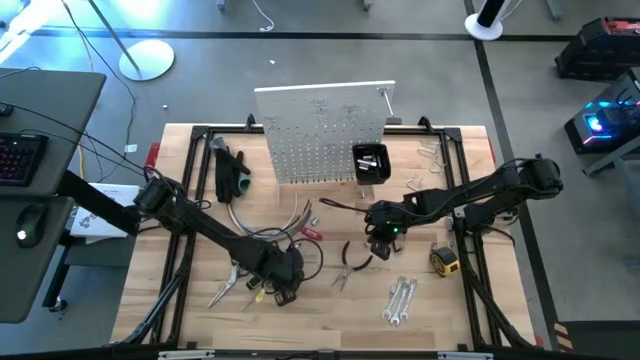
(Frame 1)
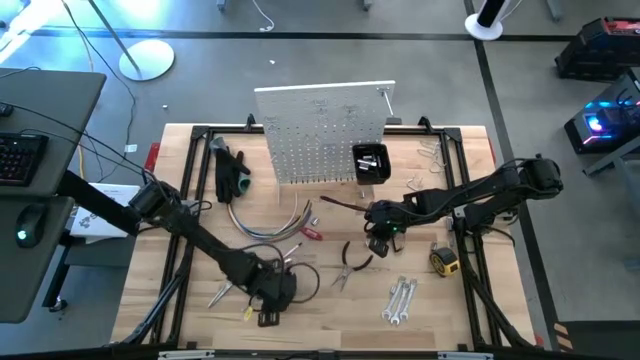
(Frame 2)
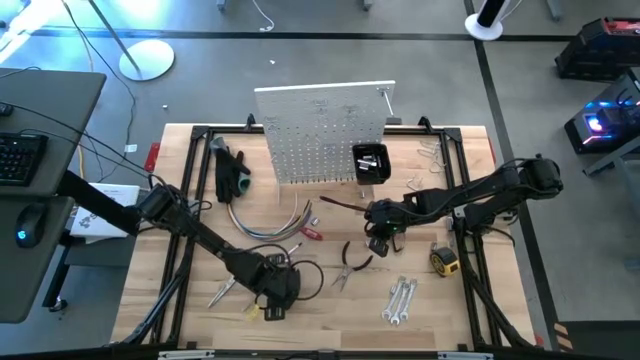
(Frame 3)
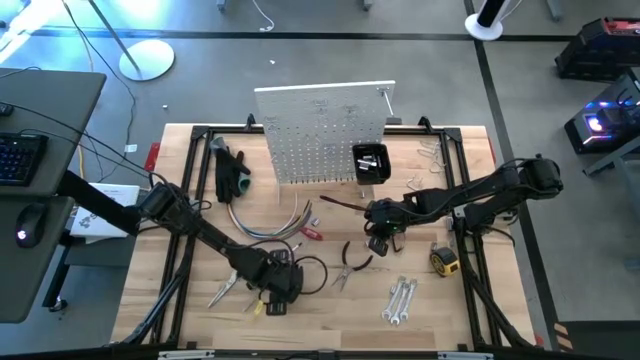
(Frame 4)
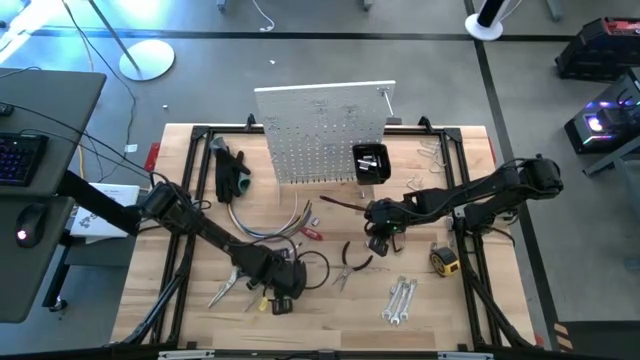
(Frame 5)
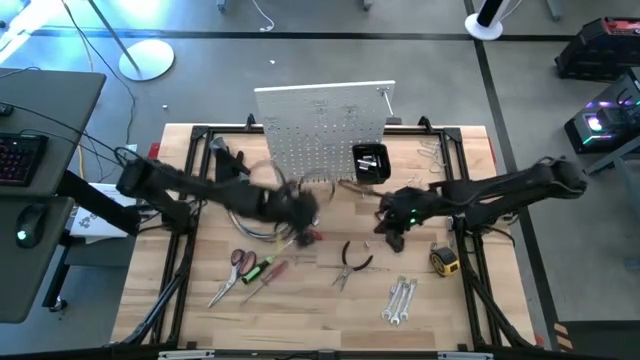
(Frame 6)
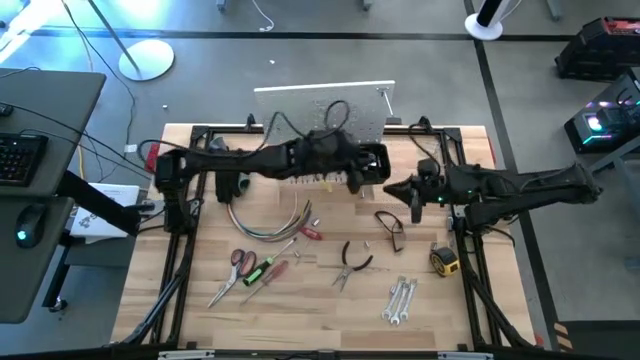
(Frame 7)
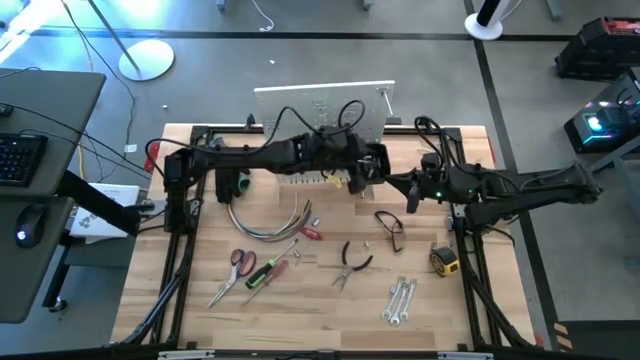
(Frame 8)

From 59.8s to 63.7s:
Task: Hang tools onto peg board
Put the socket into the black bin on the peg board

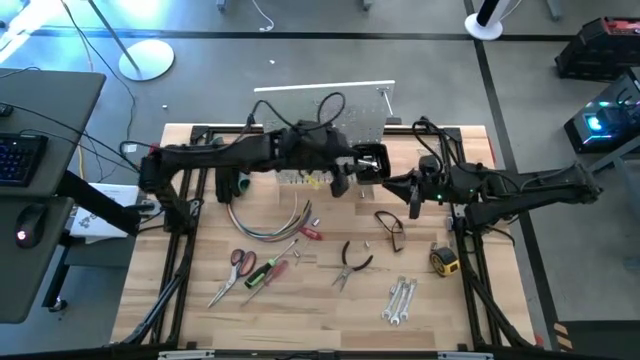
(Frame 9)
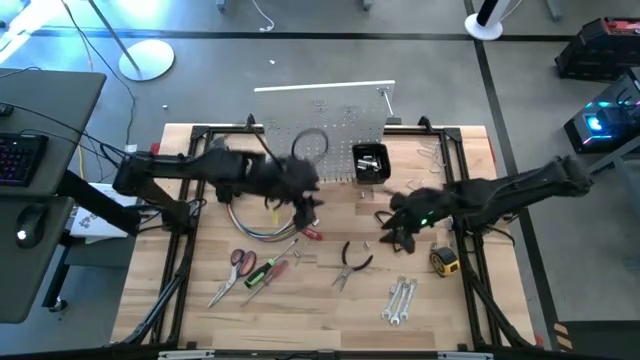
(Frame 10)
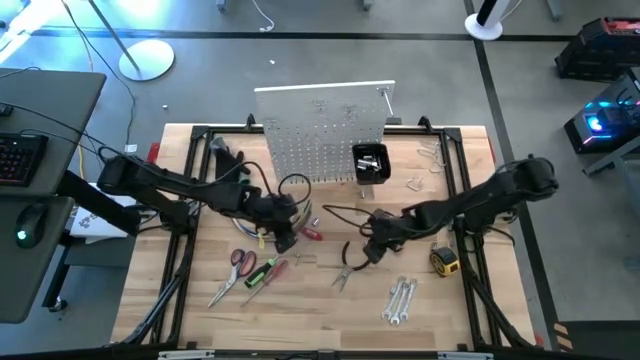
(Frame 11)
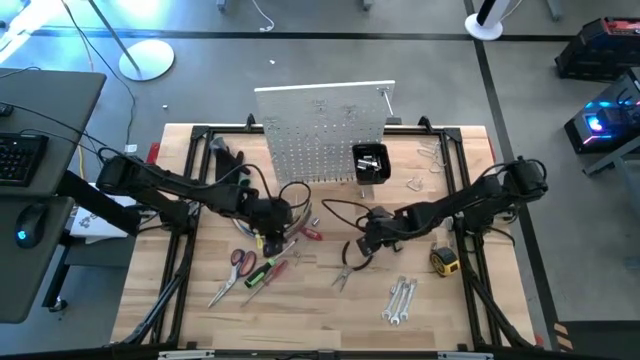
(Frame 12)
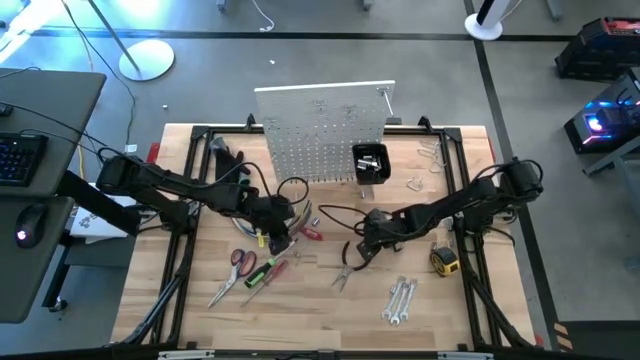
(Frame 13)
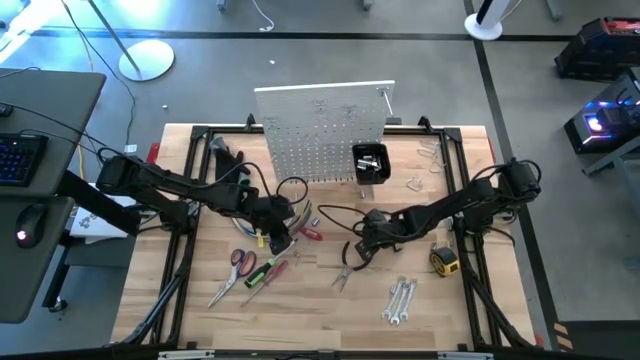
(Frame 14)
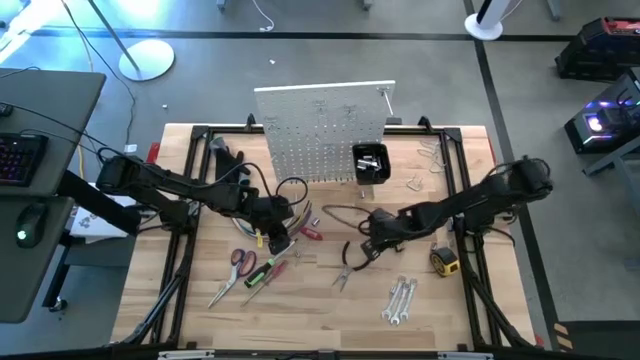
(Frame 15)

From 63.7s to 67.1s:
Put the socket into the black bin on the peg board

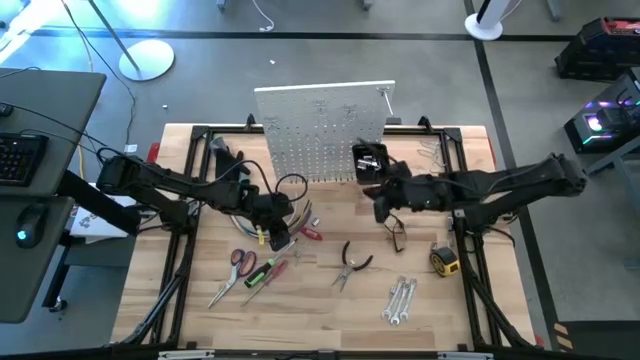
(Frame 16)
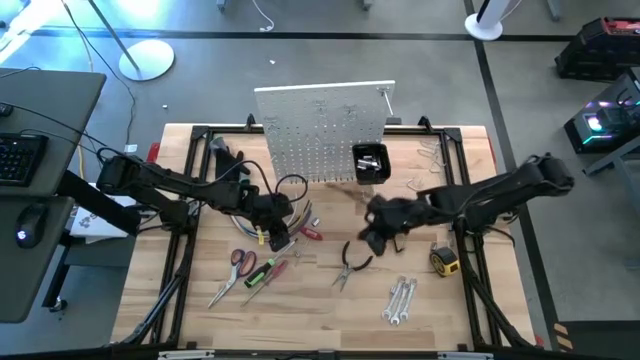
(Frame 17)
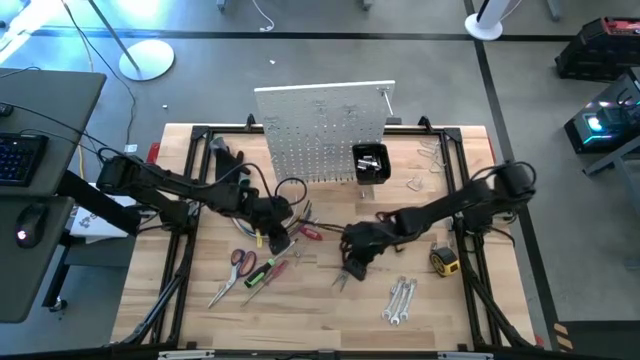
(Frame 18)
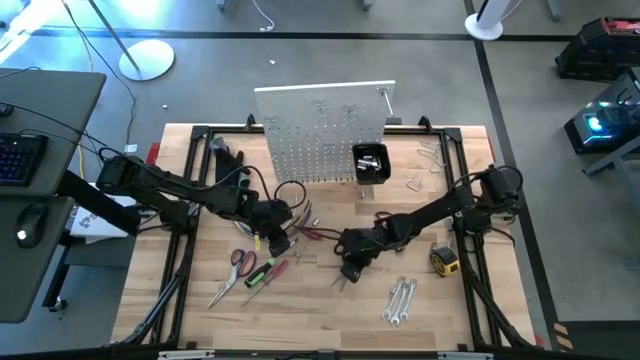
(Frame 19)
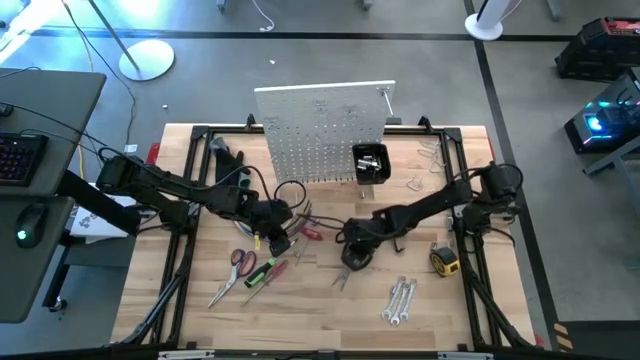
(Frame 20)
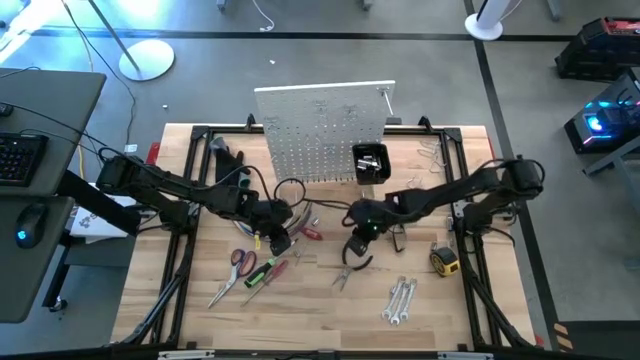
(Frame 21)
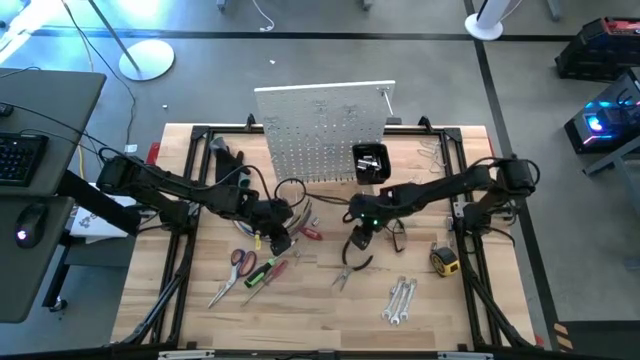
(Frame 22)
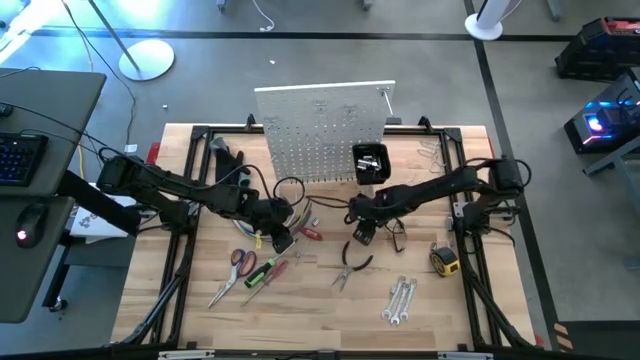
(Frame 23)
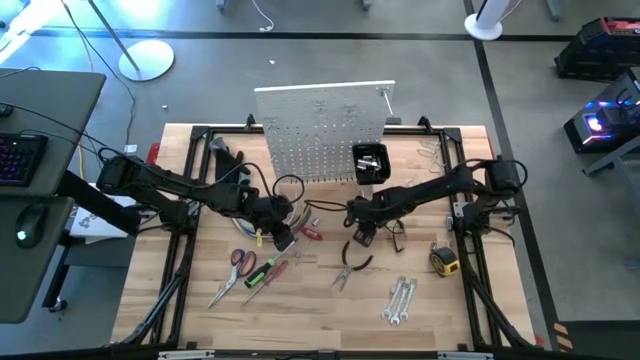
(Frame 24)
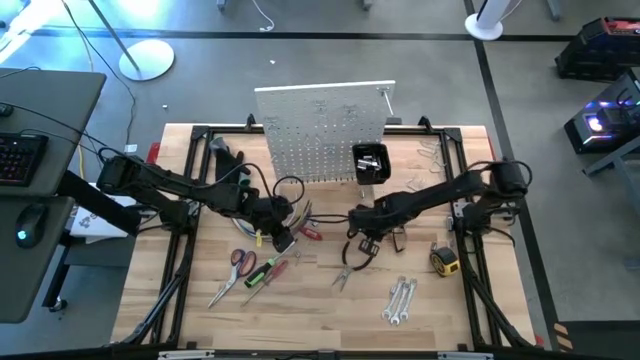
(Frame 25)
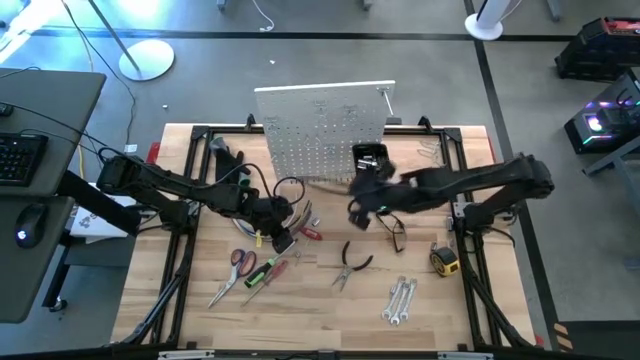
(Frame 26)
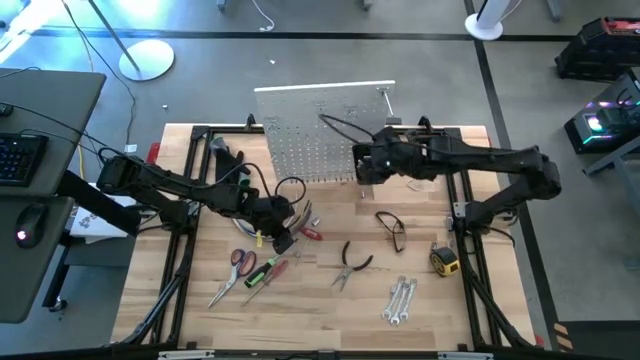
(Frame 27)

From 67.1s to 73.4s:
Put the socket into the black bin on the peg board

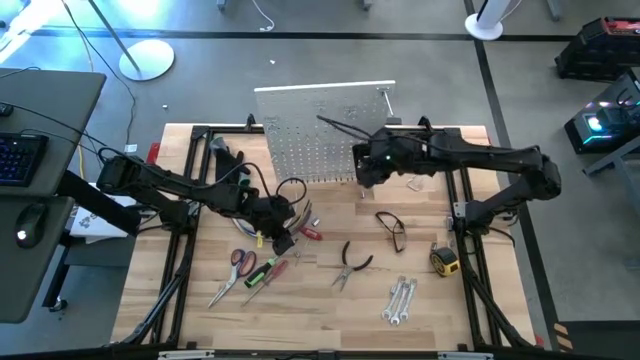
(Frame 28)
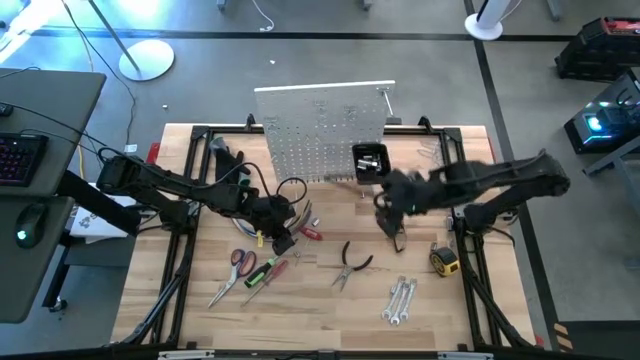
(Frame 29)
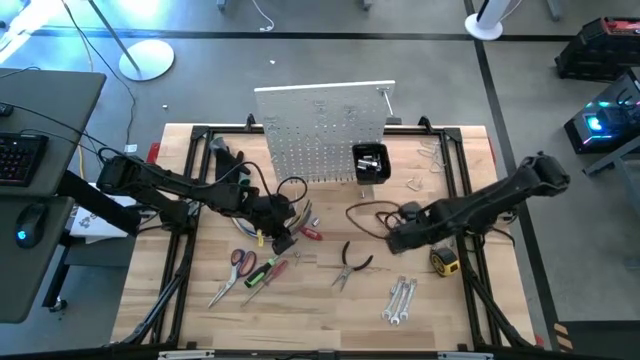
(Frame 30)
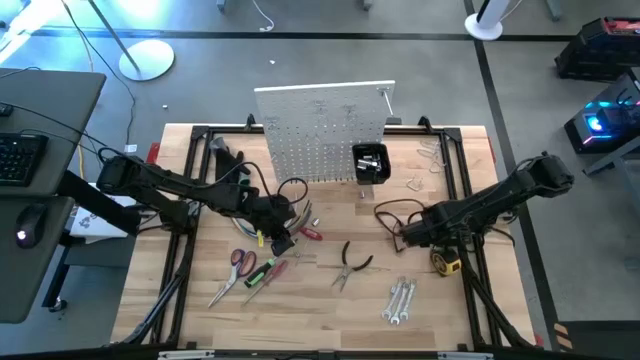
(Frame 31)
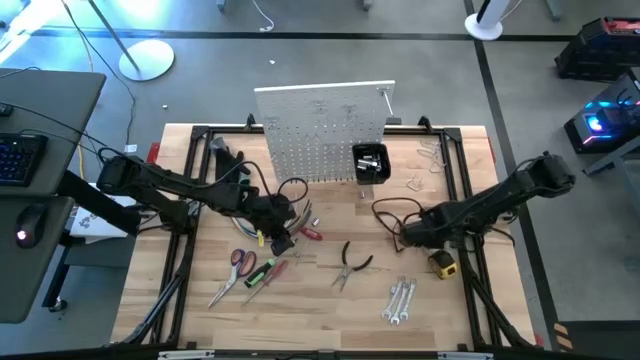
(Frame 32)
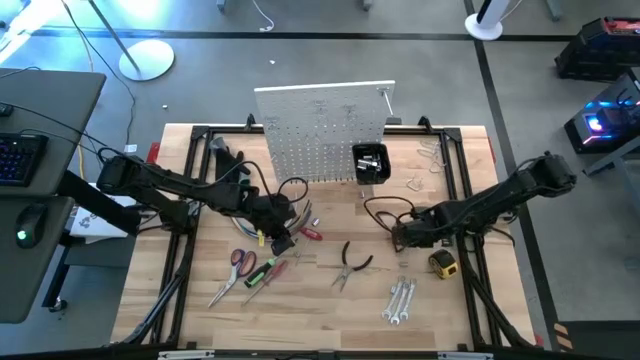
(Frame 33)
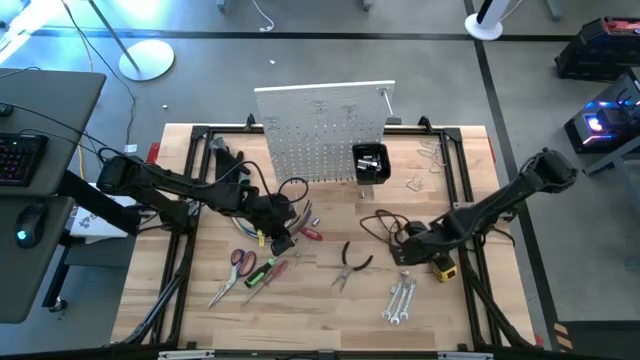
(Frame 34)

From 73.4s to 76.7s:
Put the socket into the black bin on the peg board

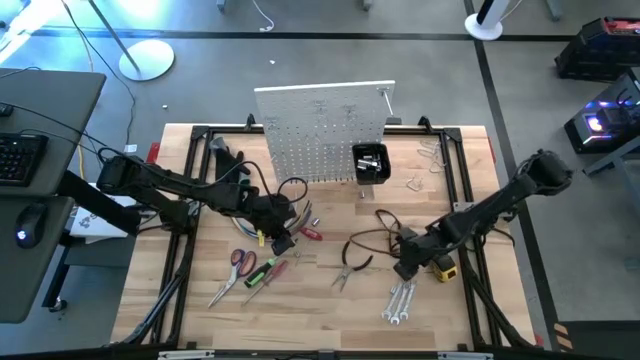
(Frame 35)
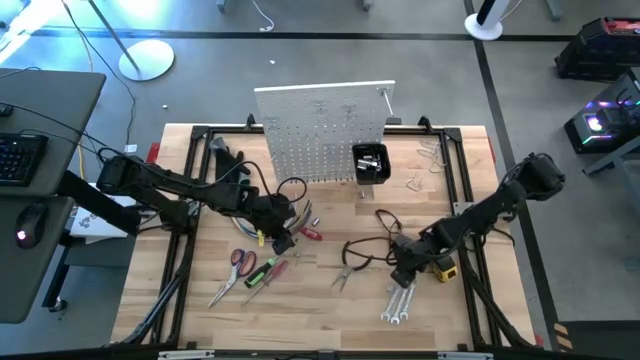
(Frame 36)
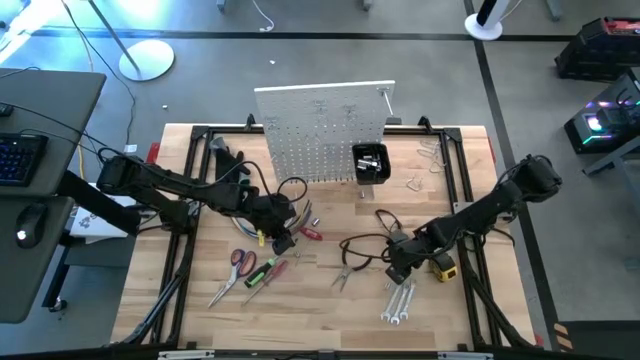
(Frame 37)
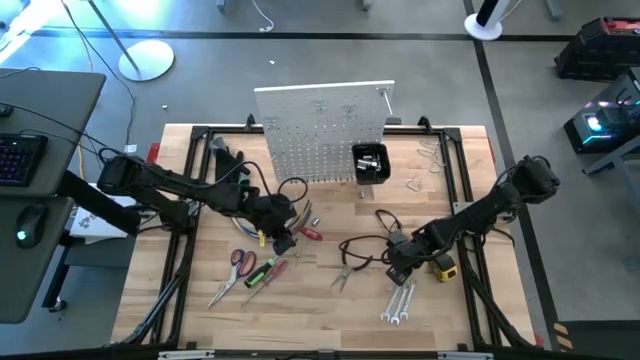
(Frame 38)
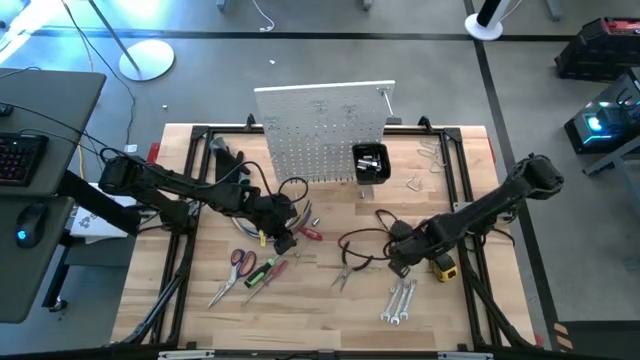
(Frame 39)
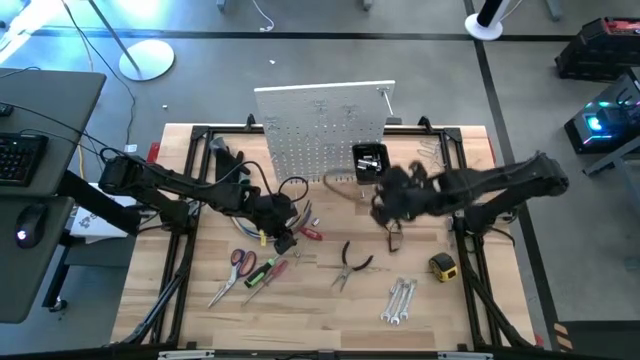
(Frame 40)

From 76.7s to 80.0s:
Put the socket into the black bin on the peg board
